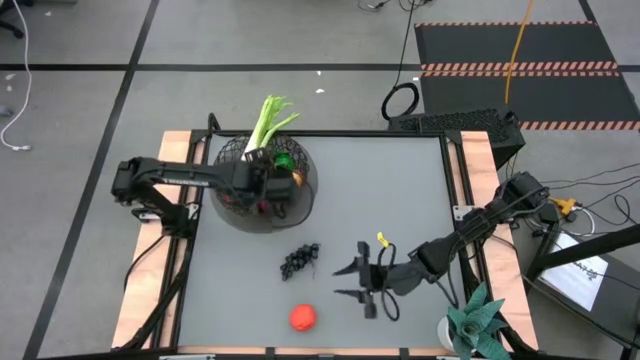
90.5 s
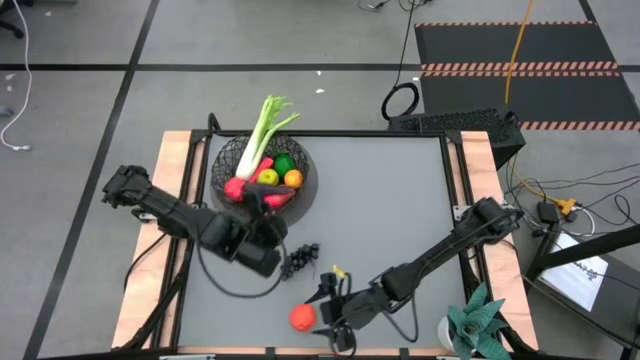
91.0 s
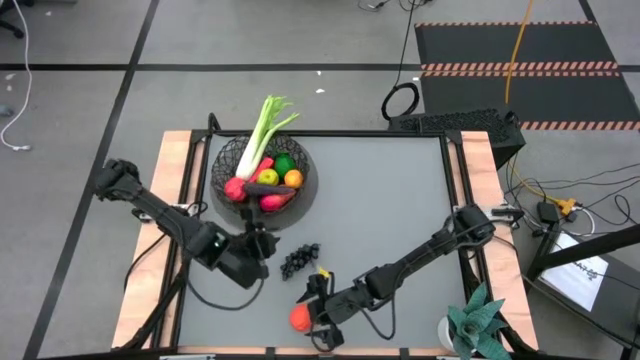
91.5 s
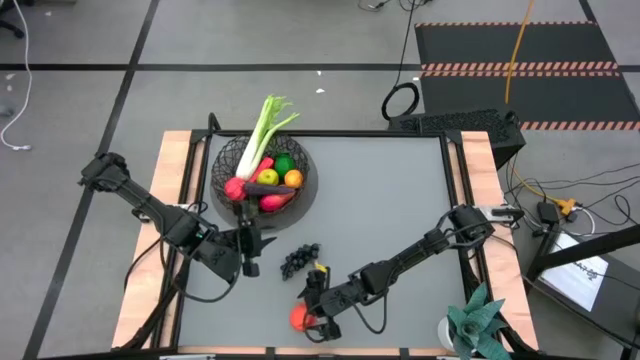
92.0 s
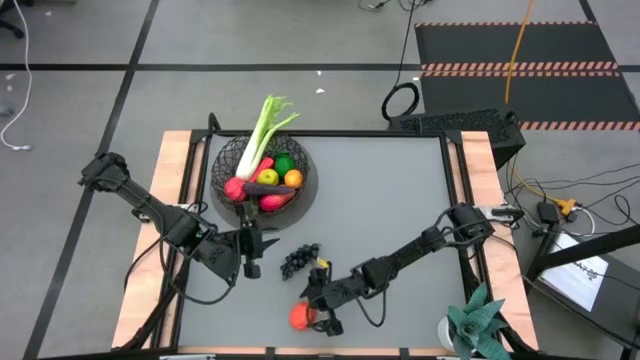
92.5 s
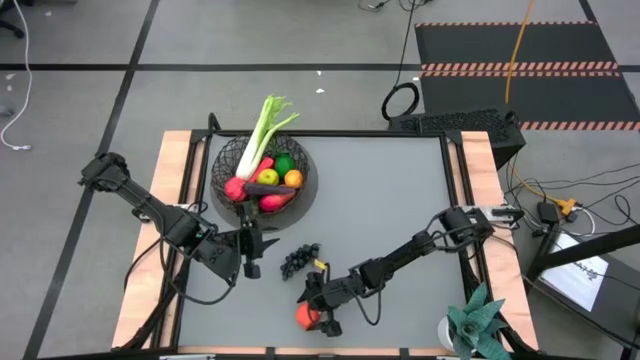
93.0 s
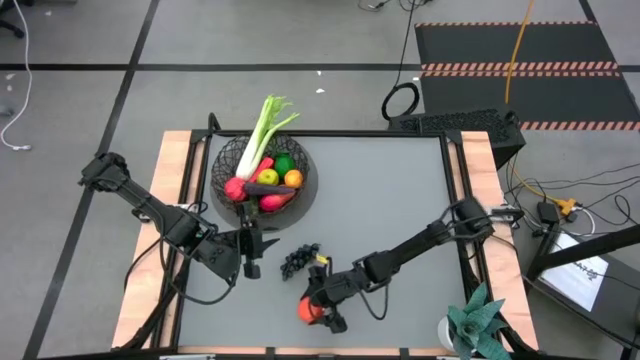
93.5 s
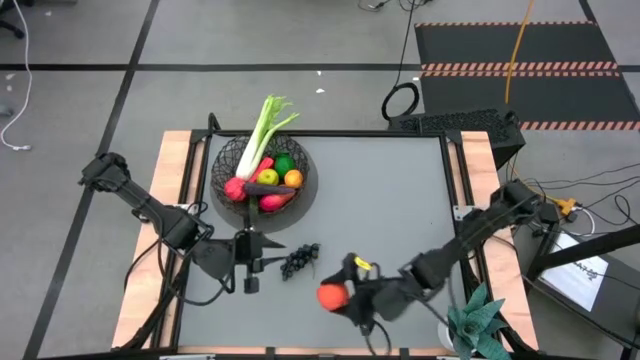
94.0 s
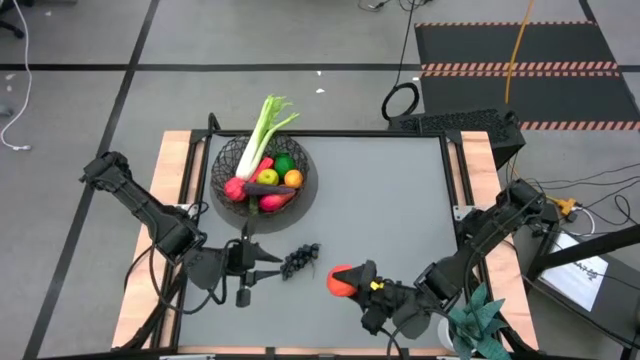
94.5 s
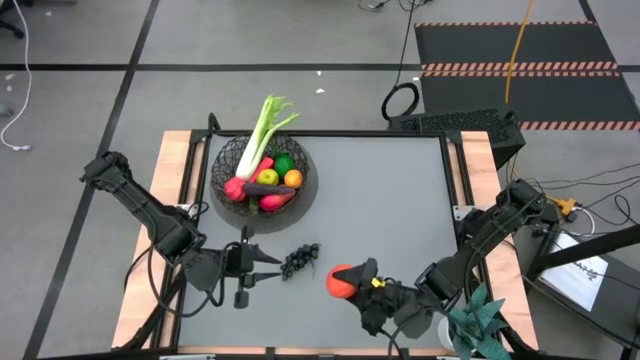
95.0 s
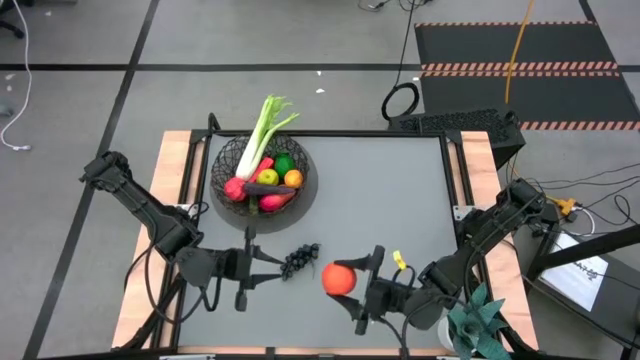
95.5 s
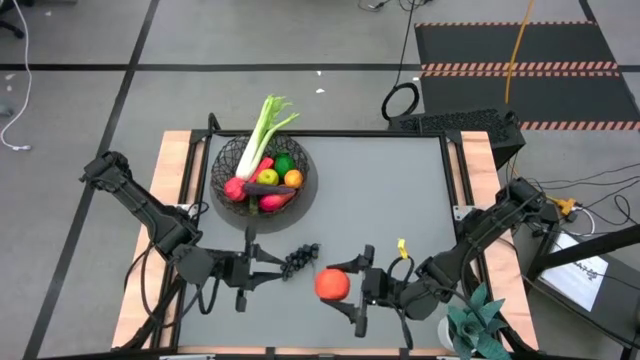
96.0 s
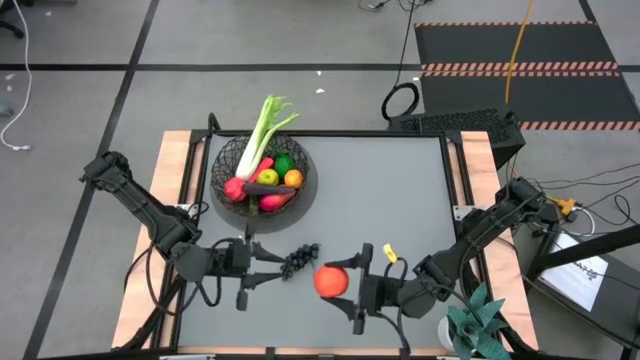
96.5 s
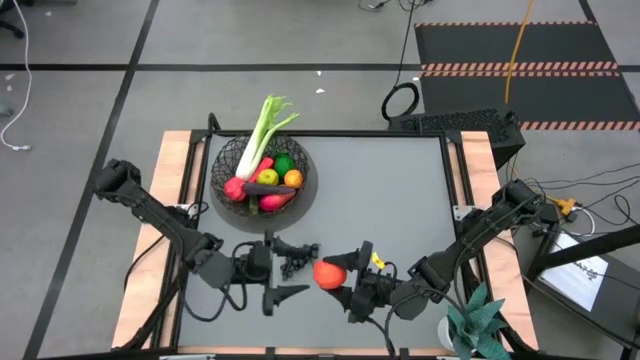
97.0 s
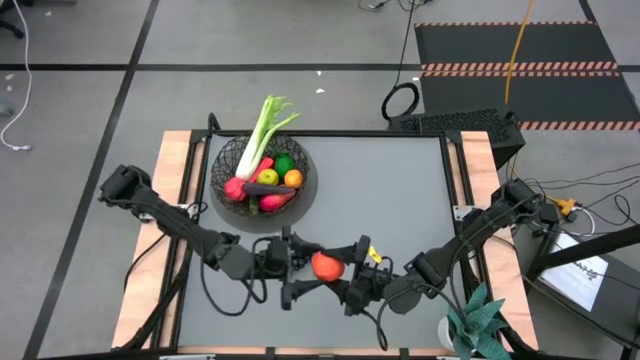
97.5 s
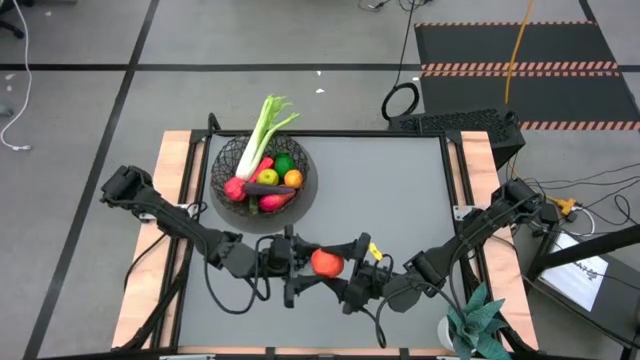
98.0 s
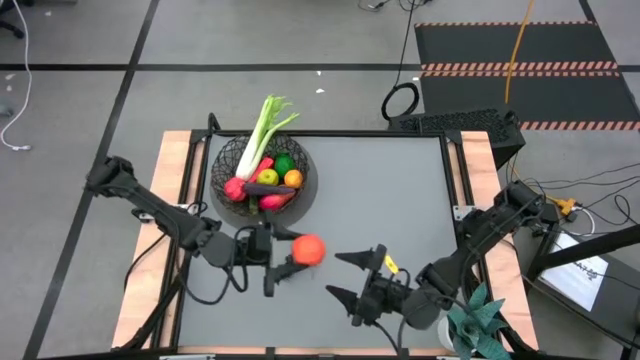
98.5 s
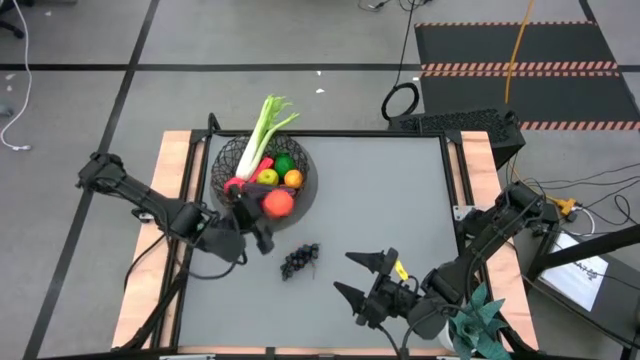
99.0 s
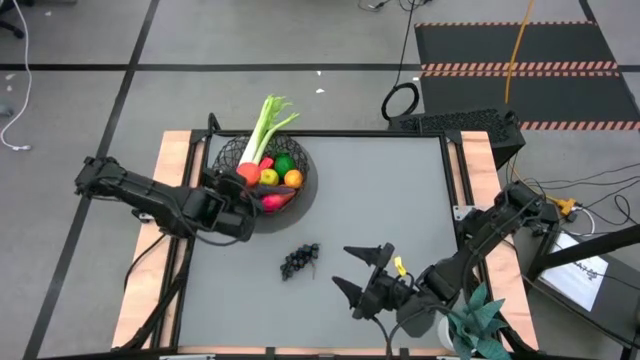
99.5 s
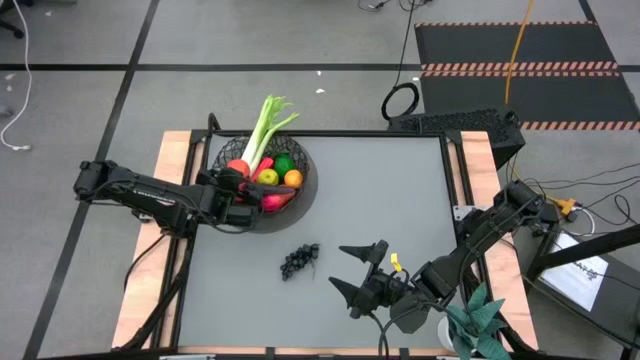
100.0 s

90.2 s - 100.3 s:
Task: Build produce basket
Put the orange into the wire basket

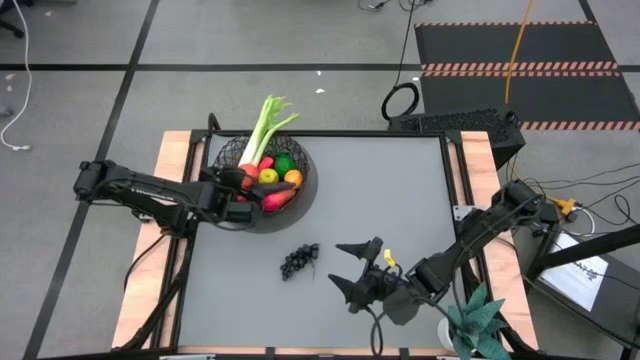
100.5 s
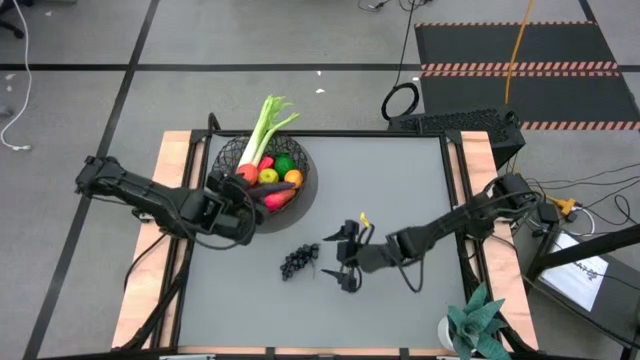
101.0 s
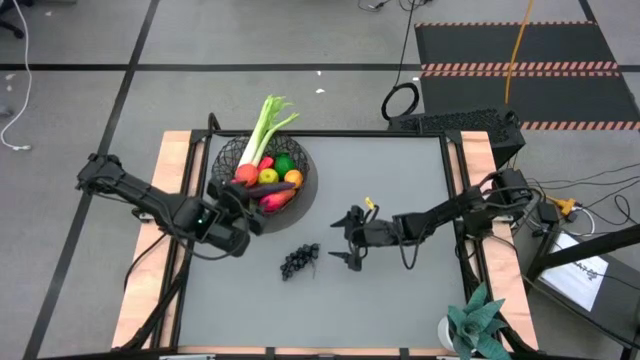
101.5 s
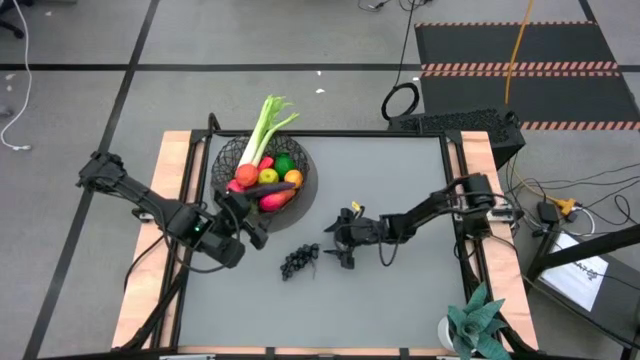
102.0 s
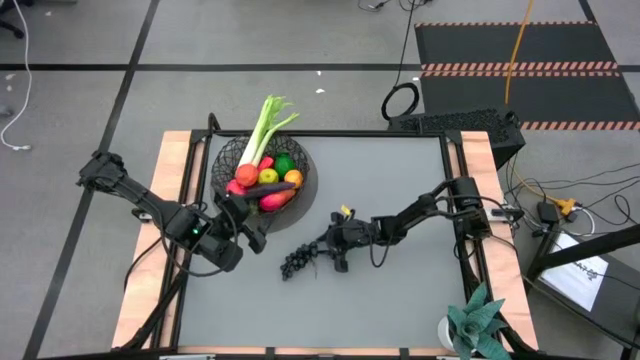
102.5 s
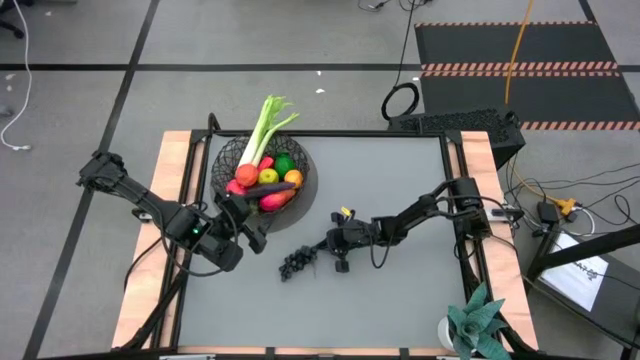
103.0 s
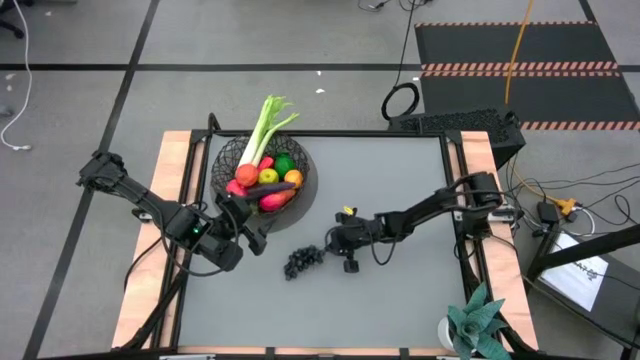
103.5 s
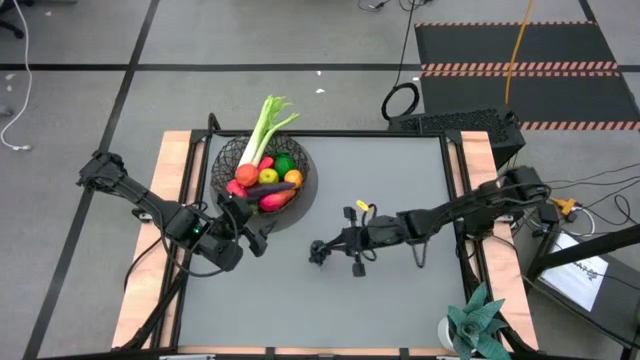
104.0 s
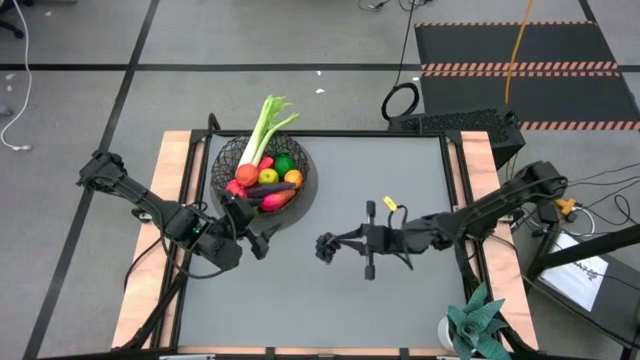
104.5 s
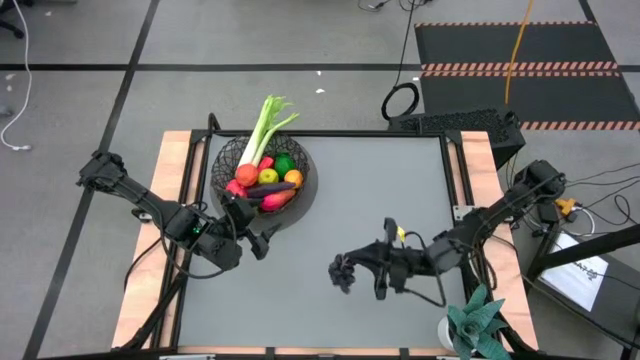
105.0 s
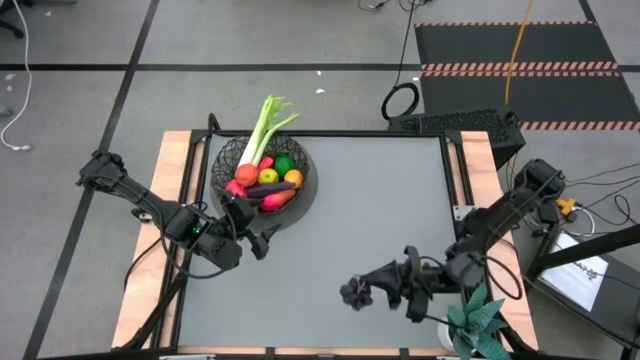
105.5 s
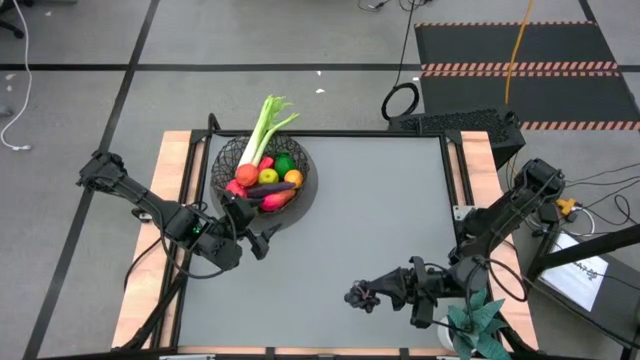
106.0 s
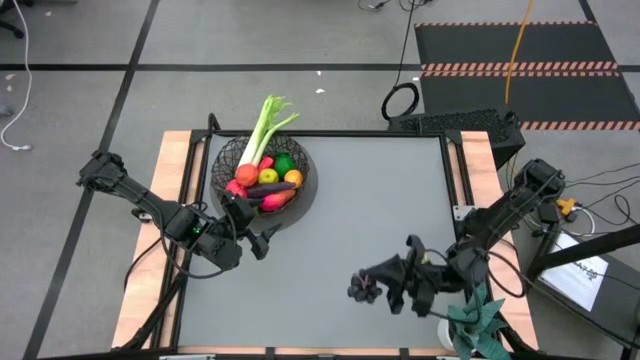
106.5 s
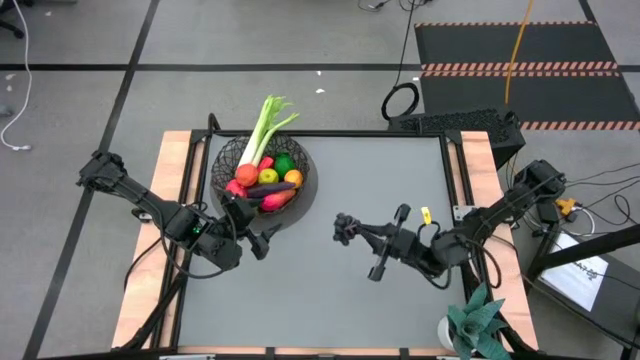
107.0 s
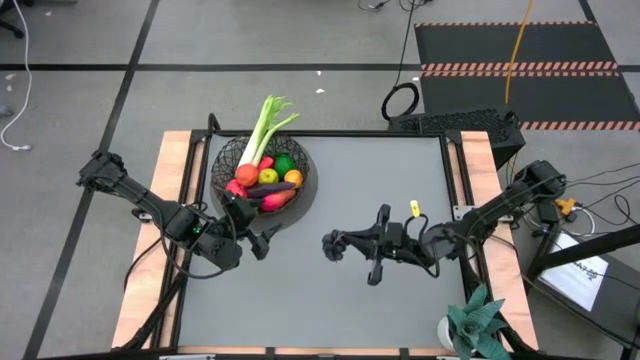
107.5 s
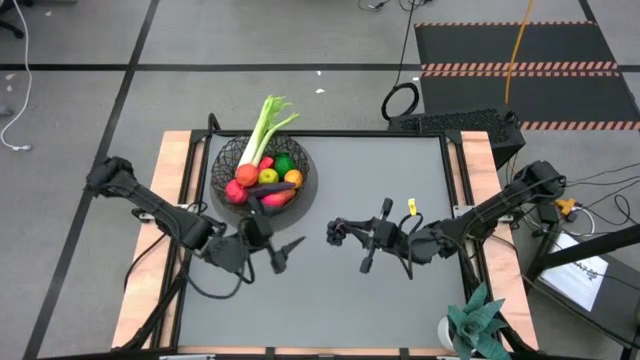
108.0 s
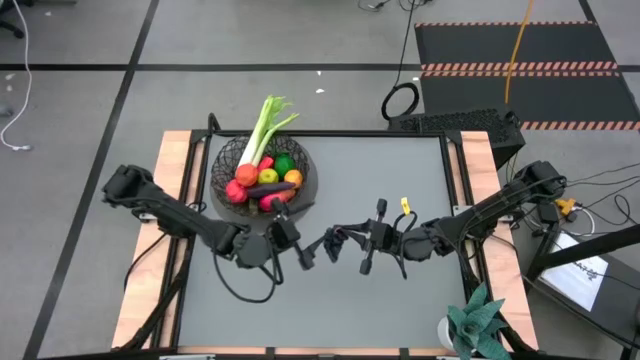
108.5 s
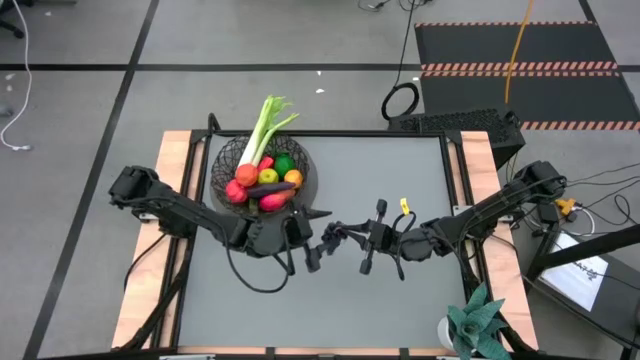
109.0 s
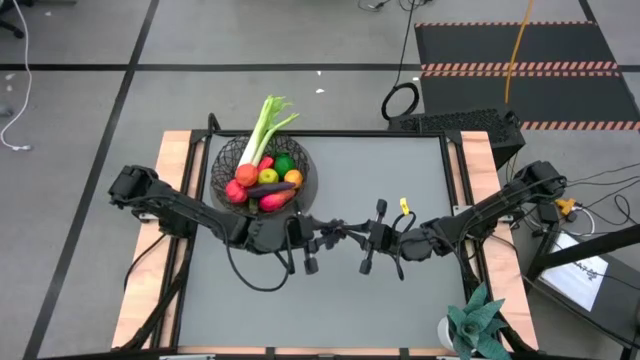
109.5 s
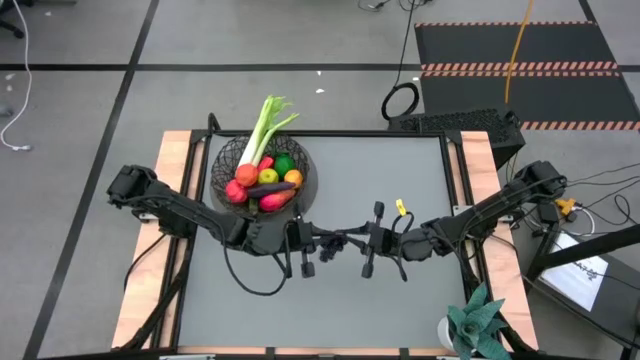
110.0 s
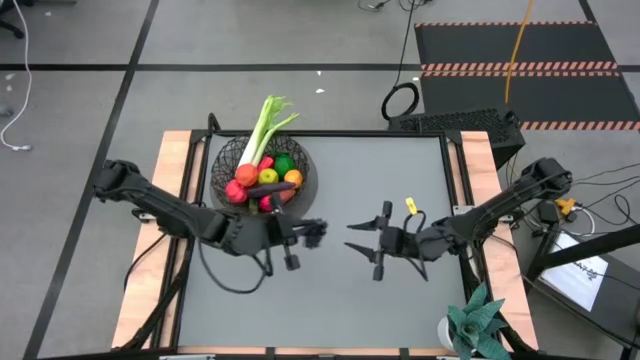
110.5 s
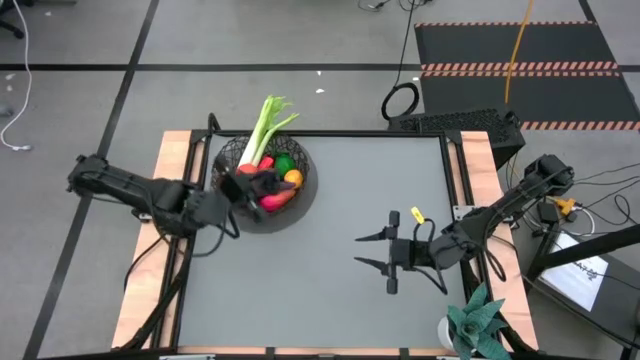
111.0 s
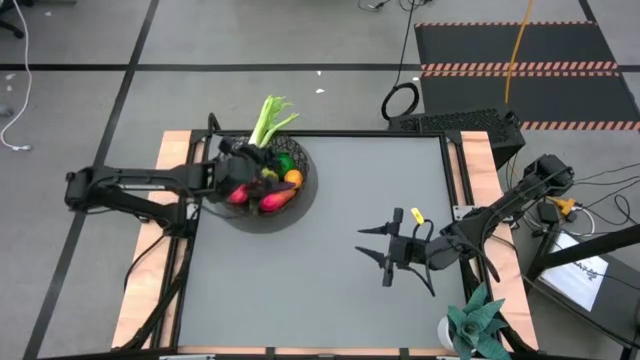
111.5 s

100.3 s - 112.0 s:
Put the grapes into the wire basket
